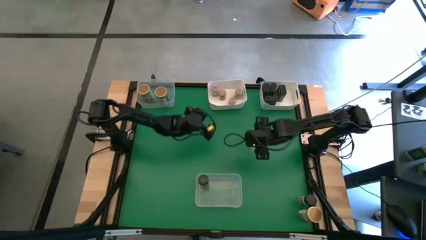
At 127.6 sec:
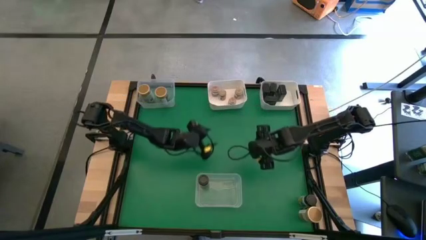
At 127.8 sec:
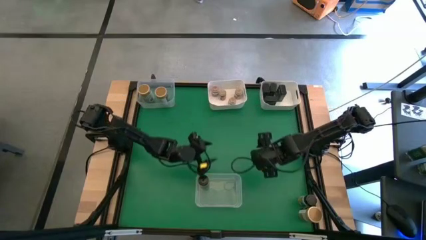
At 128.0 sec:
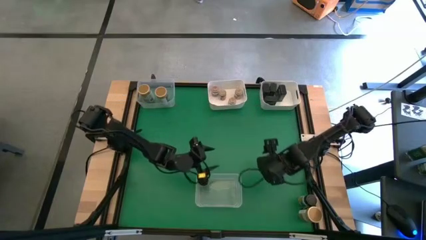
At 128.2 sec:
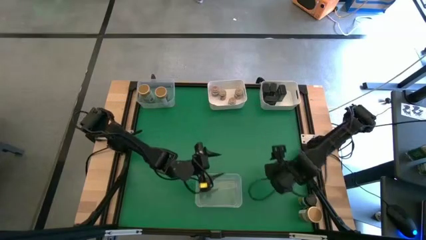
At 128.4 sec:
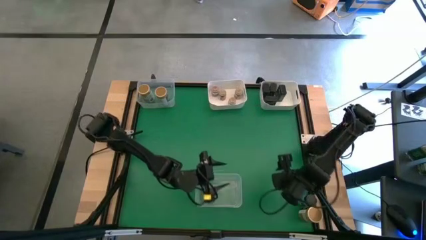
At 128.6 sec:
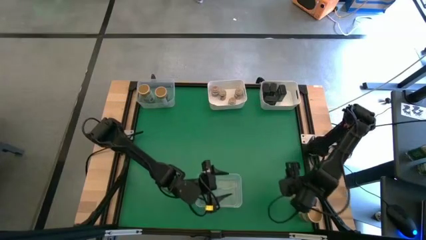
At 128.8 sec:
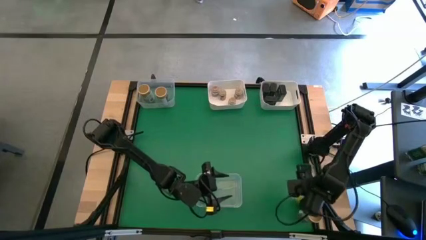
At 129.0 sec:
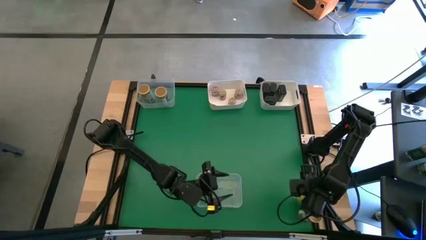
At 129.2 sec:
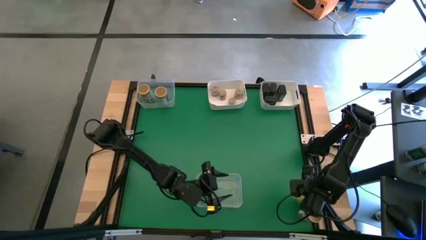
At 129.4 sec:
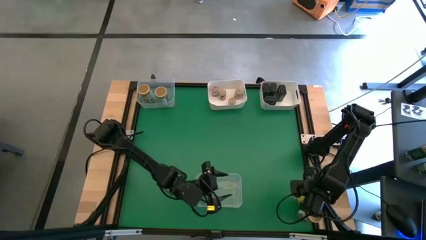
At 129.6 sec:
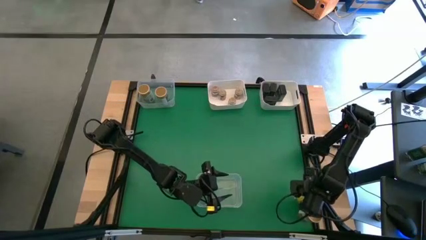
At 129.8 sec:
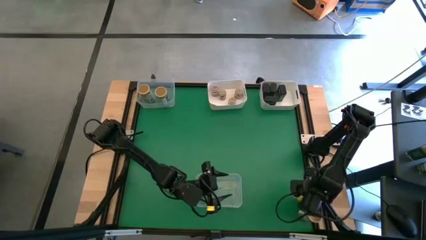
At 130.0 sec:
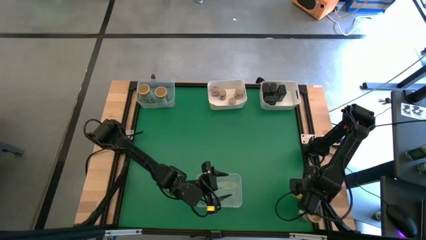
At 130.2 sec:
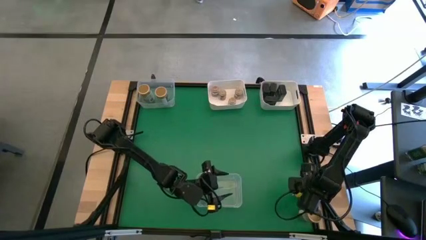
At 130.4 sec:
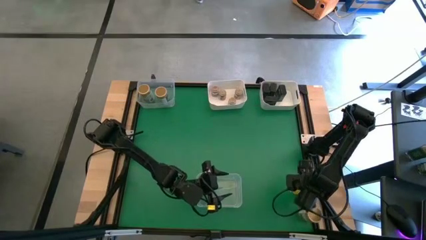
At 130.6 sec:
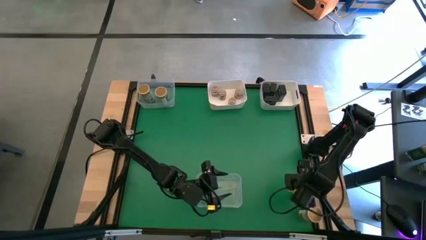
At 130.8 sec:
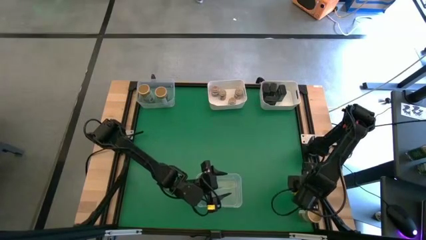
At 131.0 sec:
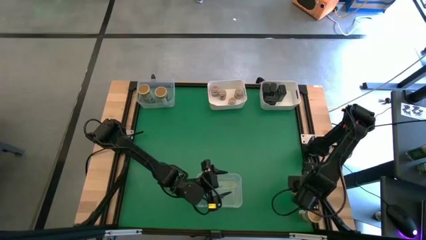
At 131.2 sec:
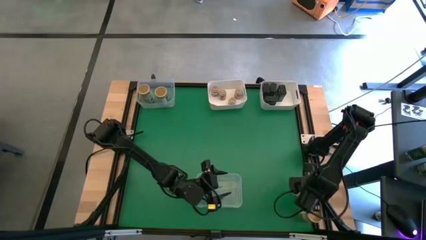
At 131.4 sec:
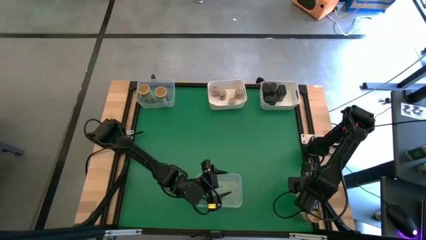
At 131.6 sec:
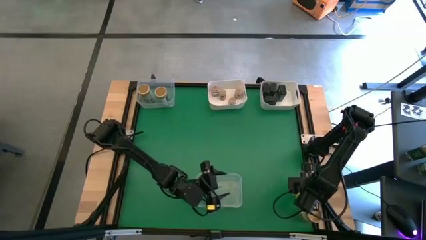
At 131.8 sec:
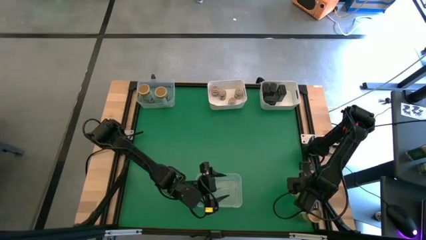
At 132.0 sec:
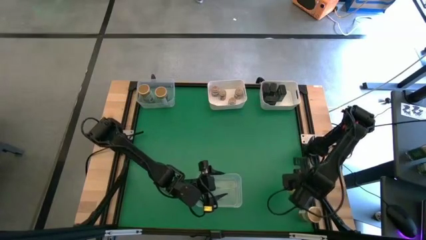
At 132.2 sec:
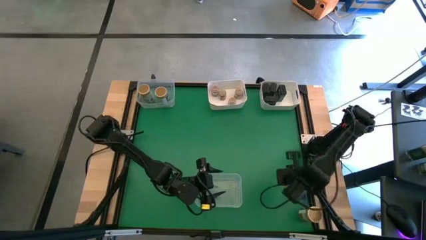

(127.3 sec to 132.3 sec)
Task: Sort spices by type
Put the black seasoning bottle into the bottom transparent bin

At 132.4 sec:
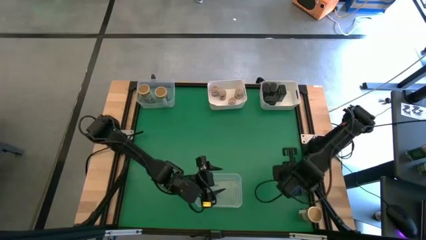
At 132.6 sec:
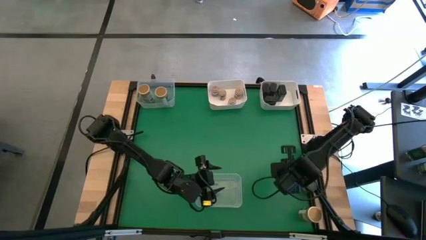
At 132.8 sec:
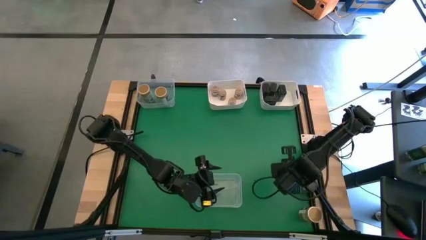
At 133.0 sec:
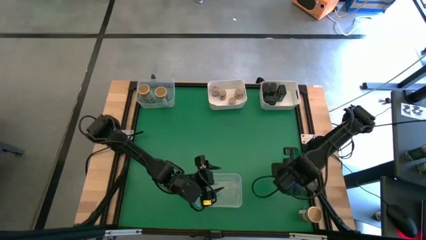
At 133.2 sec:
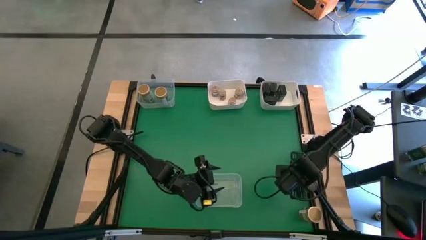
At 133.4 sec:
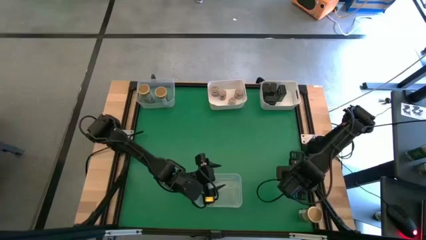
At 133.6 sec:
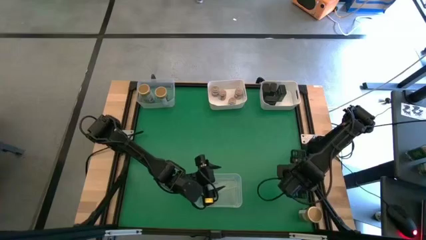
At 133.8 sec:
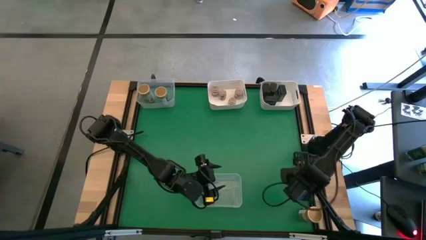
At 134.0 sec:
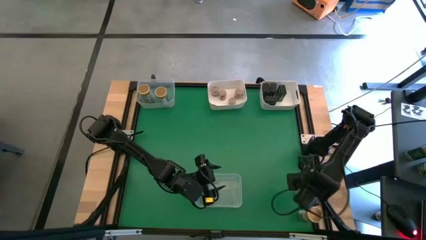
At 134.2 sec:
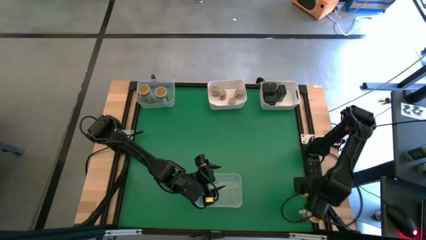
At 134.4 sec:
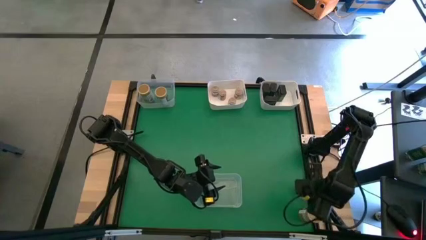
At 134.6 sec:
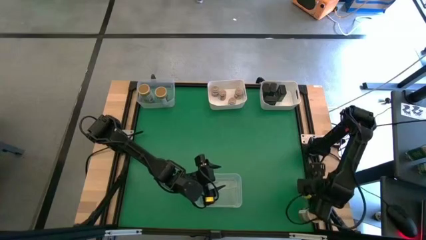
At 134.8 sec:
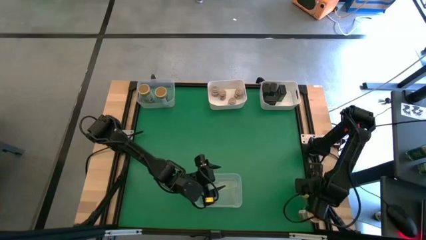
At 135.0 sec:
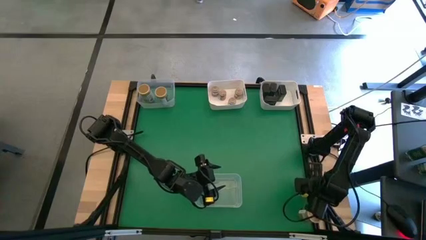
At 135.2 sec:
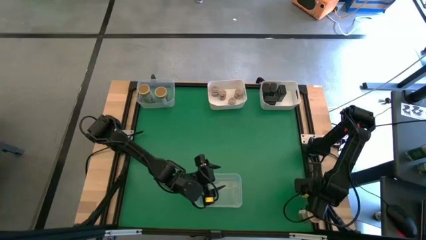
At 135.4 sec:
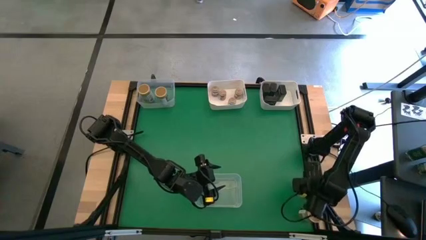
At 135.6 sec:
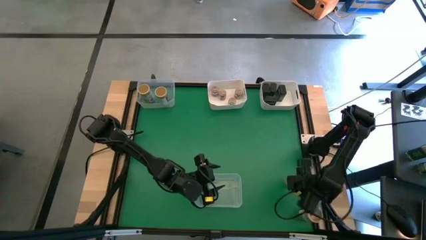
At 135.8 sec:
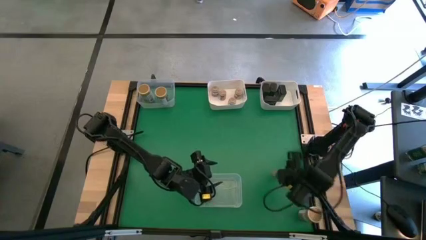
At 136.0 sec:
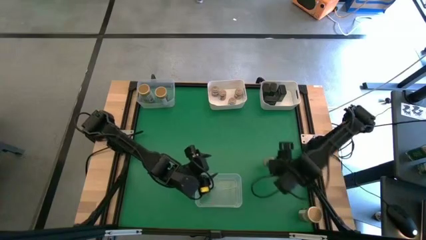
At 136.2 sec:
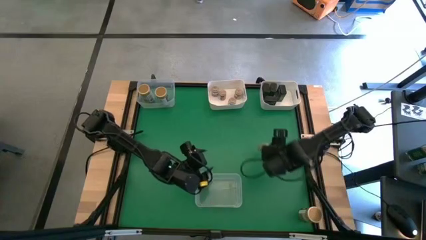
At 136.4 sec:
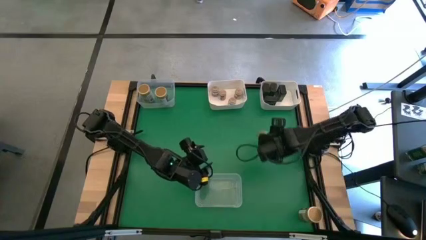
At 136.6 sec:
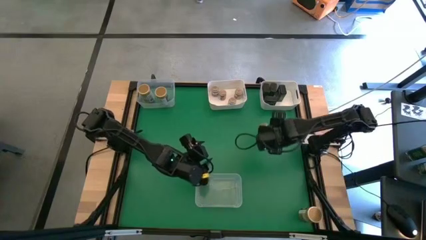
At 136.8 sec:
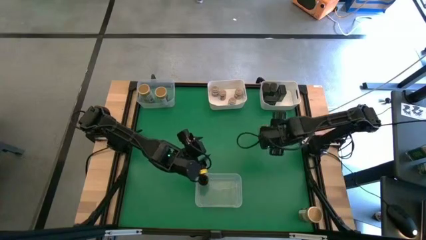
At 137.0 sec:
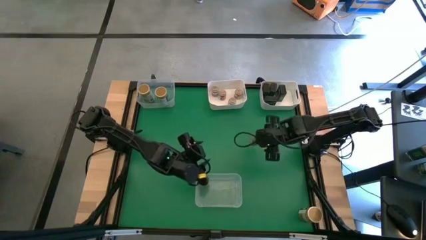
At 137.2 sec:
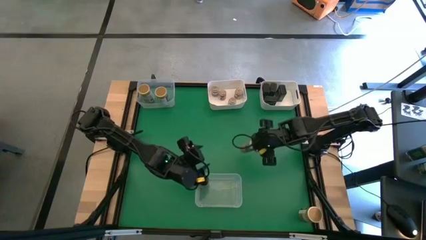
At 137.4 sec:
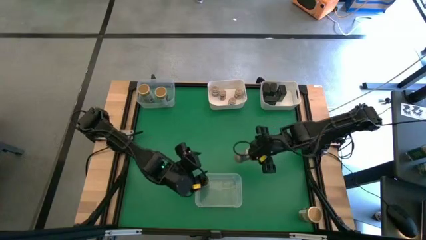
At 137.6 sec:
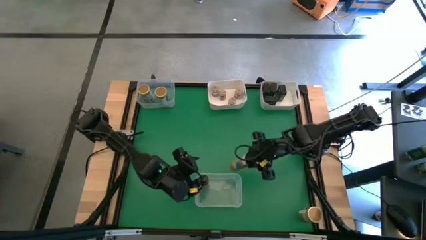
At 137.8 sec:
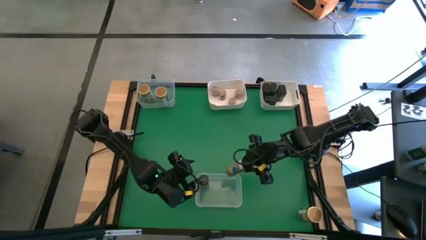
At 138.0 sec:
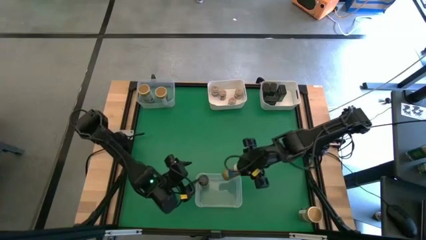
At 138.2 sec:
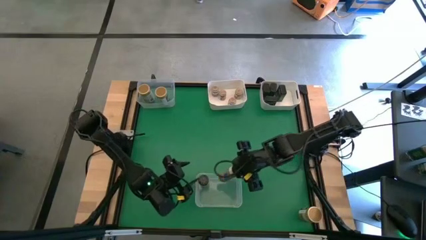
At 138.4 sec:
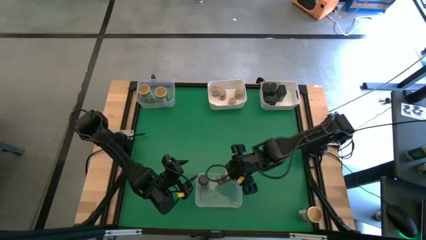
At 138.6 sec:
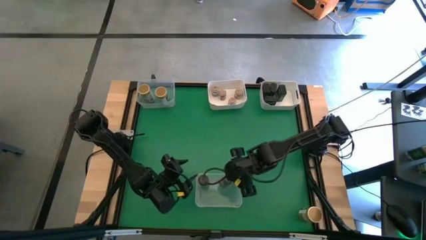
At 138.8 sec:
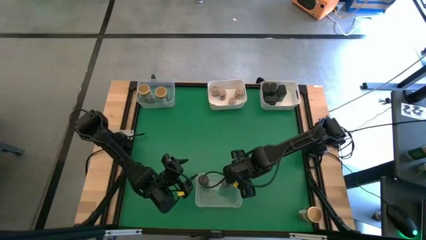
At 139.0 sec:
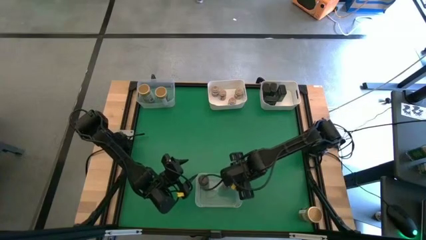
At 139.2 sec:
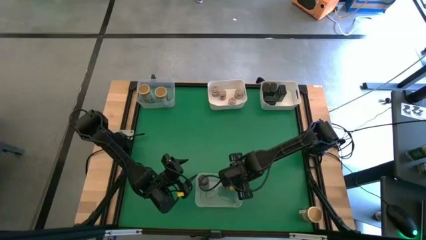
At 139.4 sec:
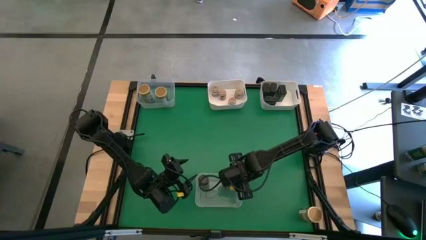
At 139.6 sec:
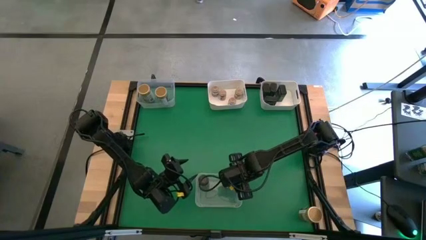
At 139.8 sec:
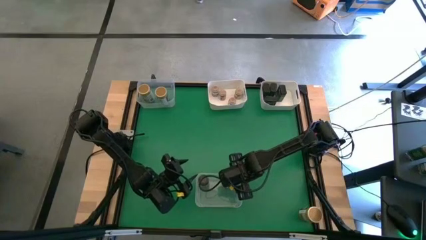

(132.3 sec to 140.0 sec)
Put the black seasoning bottle into the bottom transparent bin

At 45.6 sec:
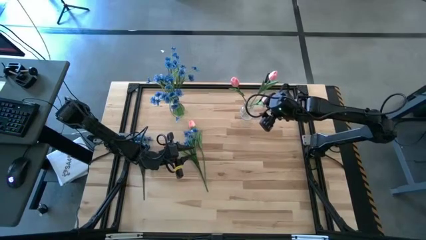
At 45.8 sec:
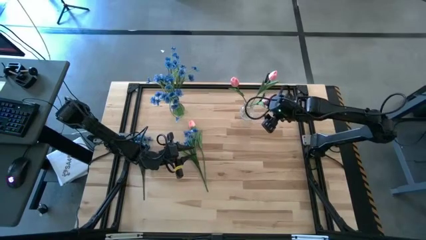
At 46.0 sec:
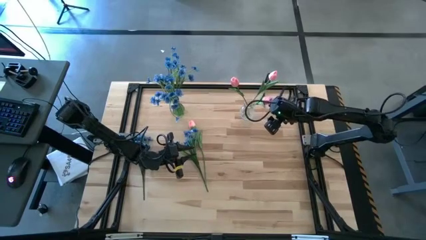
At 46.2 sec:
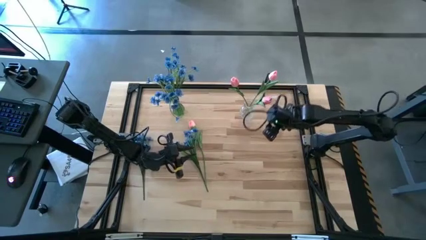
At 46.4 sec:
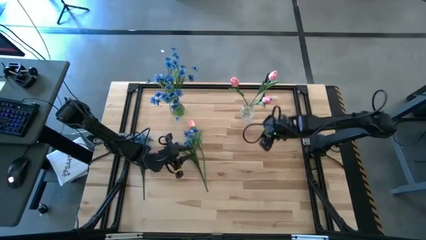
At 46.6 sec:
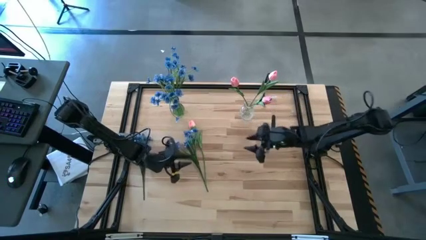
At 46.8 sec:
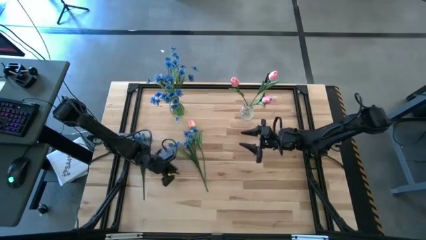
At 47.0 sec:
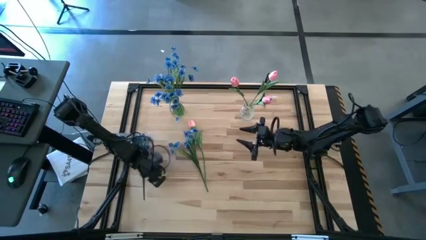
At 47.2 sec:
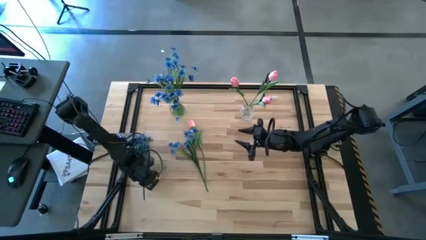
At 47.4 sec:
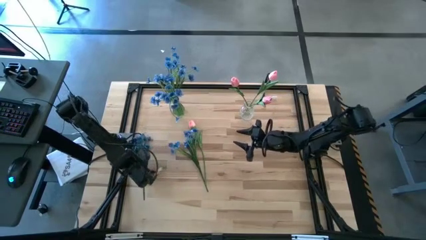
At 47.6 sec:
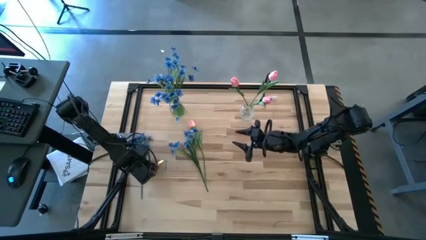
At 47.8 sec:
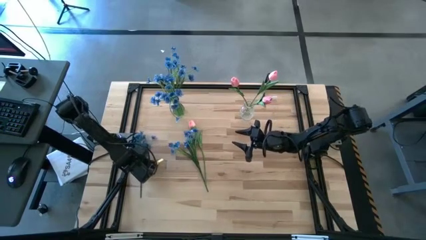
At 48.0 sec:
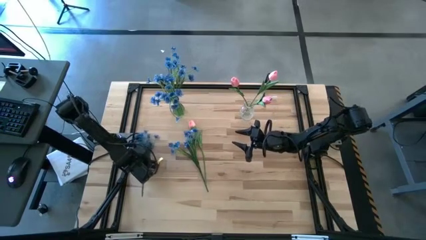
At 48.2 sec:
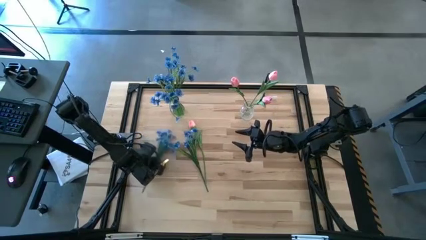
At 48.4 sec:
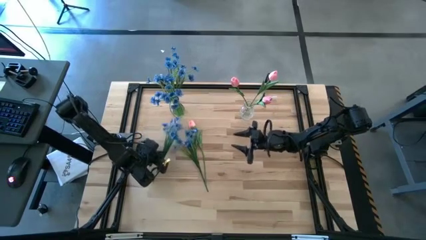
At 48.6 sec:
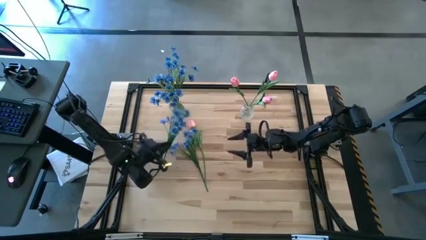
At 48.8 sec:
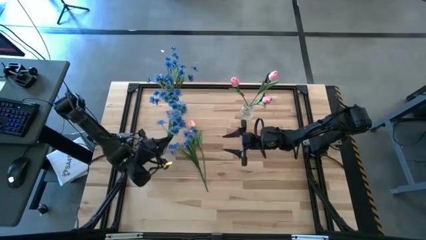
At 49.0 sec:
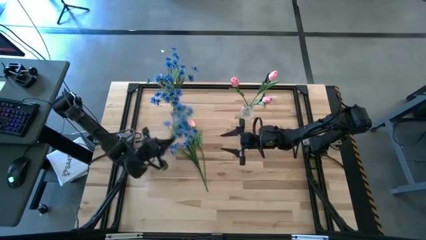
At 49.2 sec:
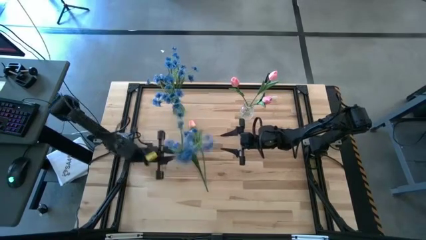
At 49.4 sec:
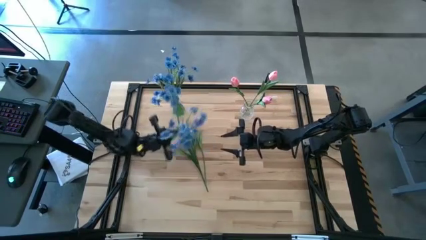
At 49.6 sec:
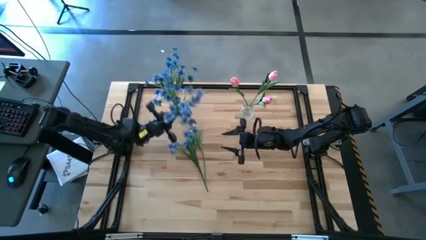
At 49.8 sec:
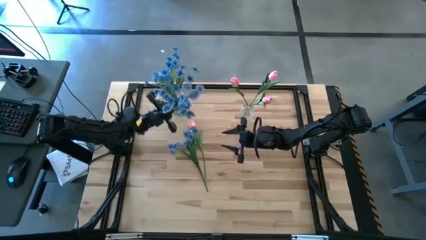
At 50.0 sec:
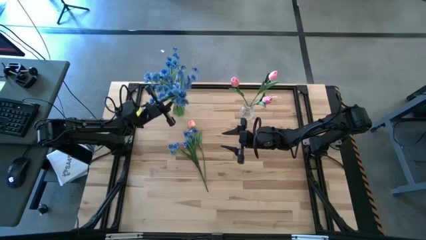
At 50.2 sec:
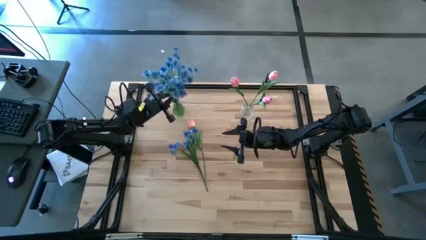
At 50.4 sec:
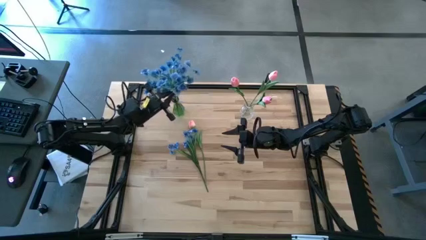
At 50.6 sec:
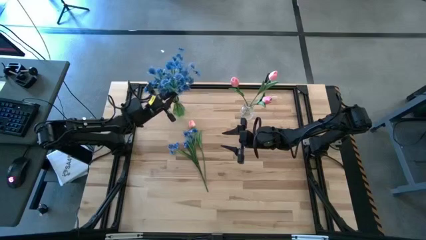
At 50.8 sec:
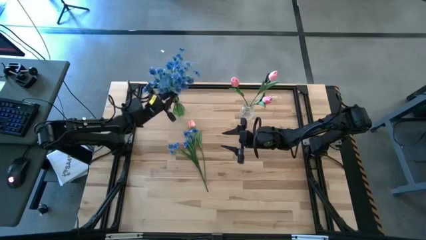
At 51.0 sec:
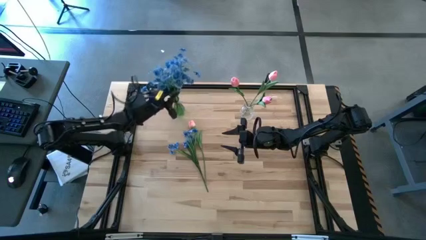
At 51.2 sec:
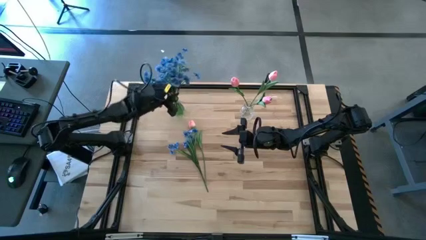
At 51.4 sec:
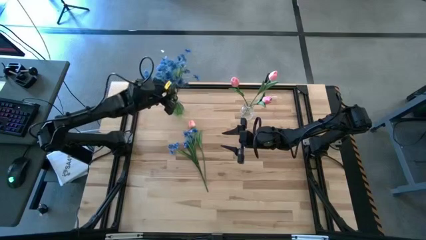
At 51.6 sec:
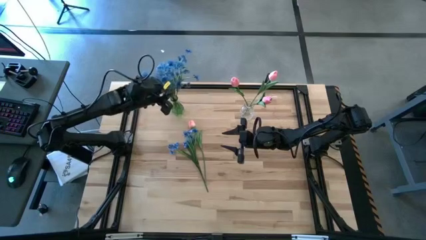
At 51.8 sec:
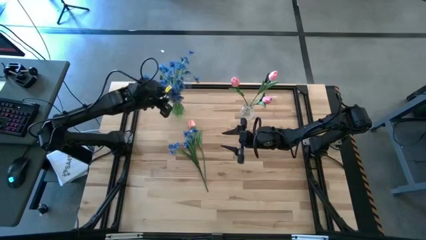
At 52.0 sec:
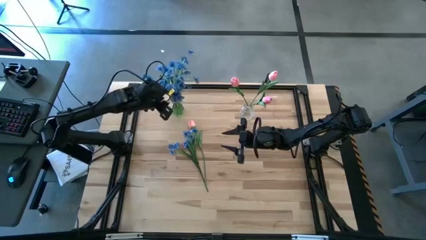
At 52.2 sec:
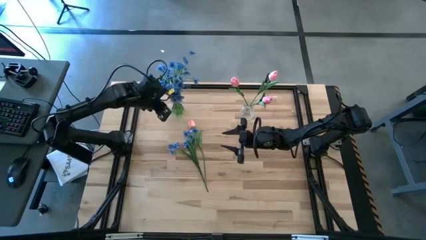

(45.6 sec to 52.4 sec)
Task: Sort flowers into vase by color
Put the left blue flowers into the green vase
